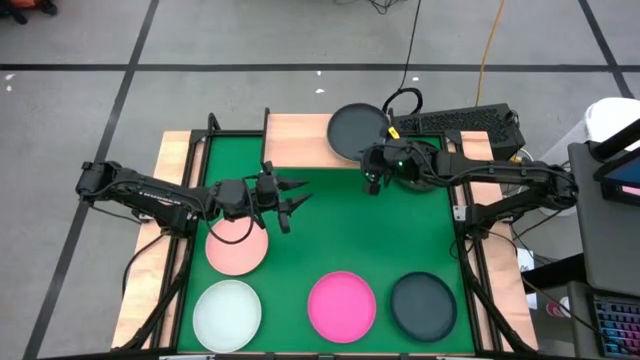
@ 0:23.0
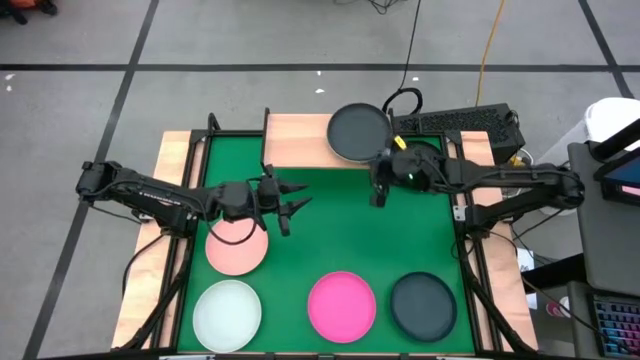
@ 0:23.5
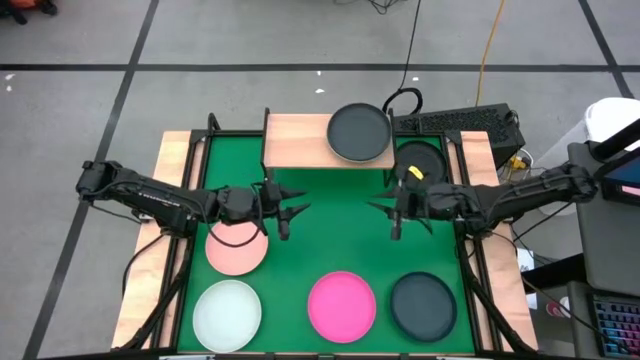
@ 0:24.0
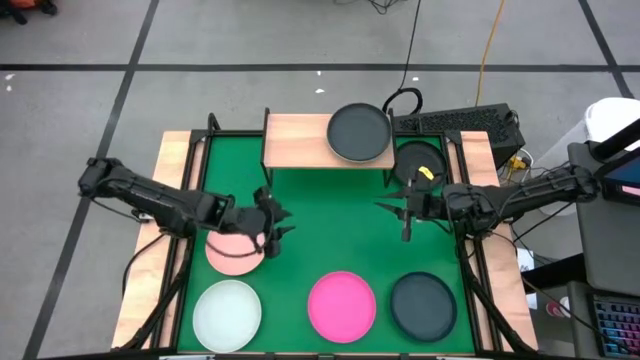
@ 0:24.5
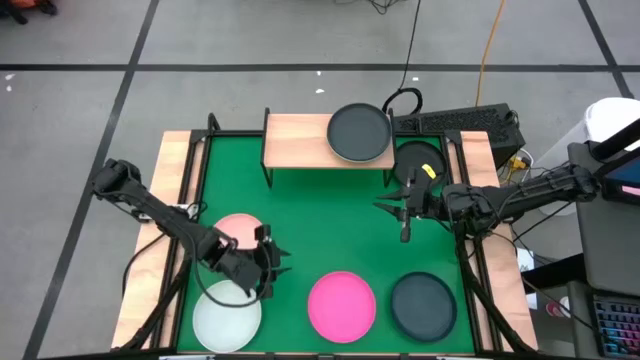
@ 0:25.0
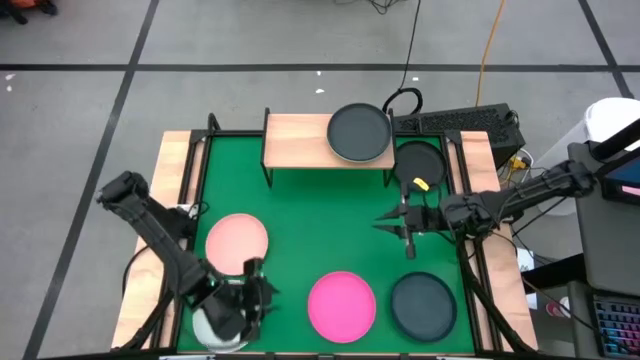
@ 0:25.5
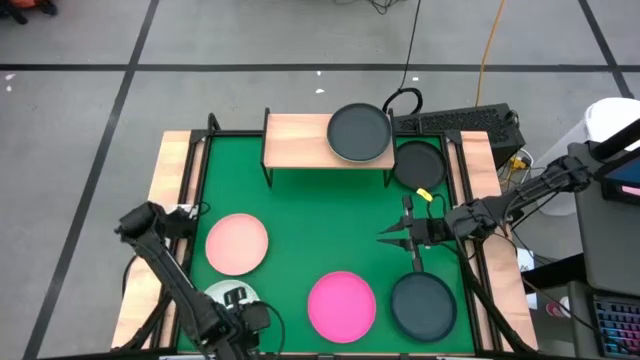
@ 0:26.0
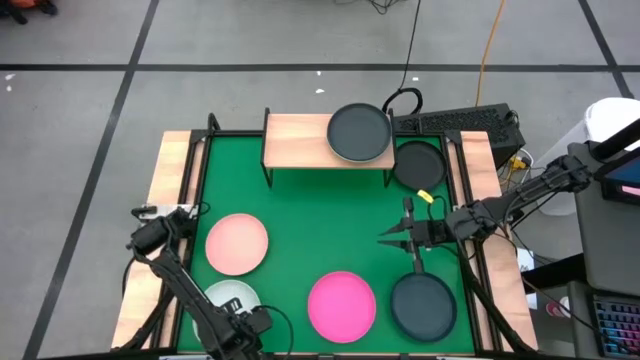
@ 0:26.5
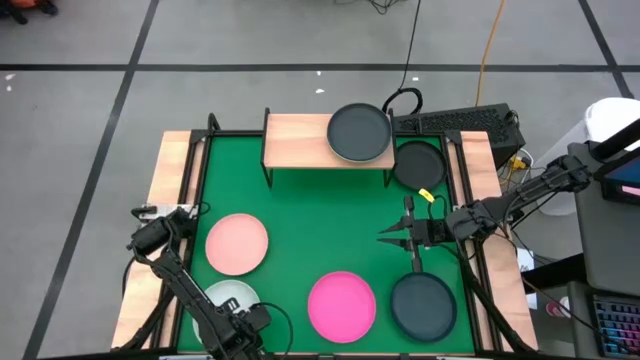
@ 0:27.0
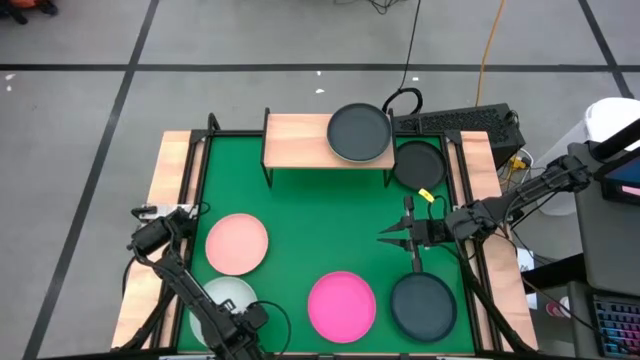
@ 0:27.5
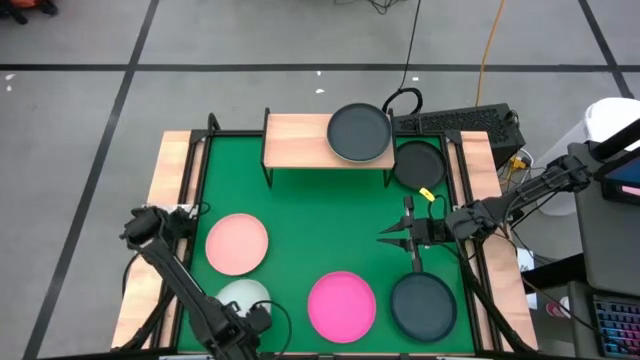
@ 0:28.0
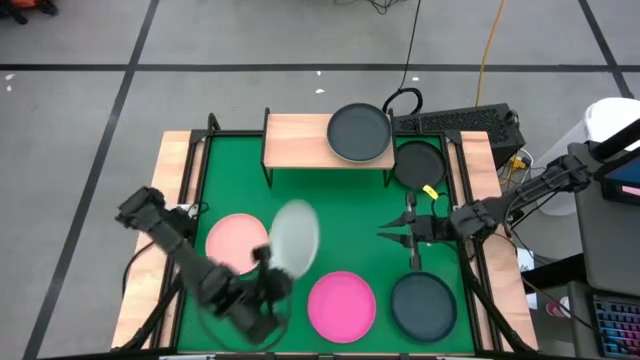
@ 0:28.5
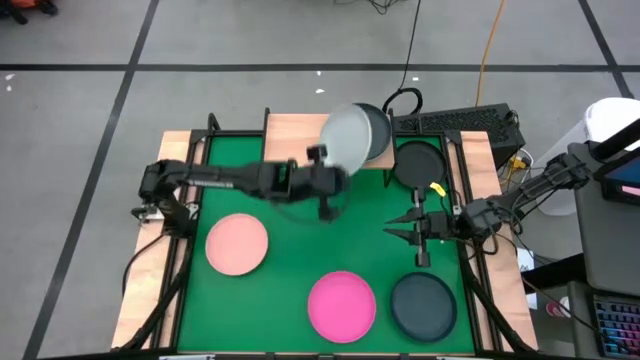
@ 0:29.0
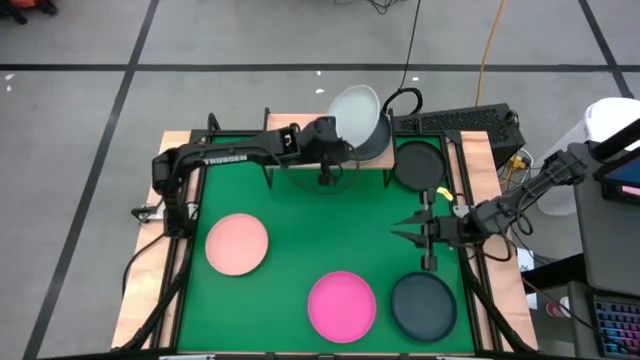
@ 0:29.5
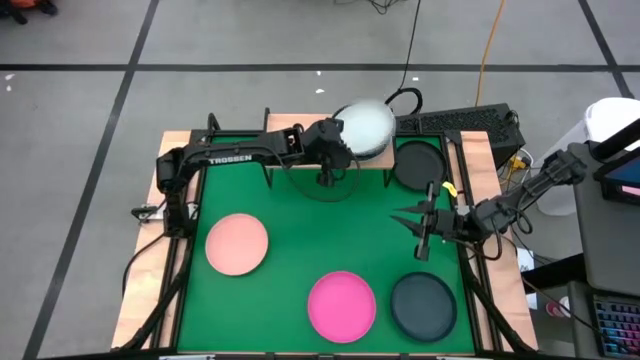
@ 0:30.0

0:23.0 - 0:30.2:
Task: Place and stack plates onto a shelf
Stack the gray plate on top of the black plate on the shelf

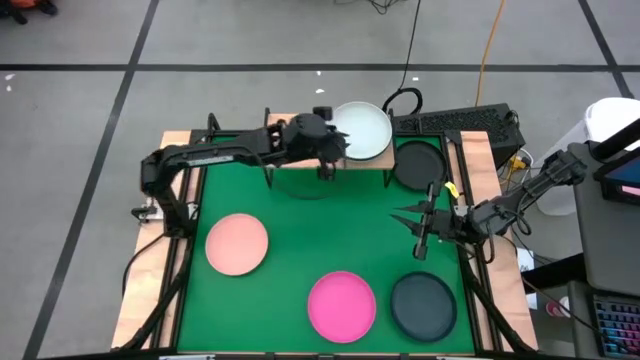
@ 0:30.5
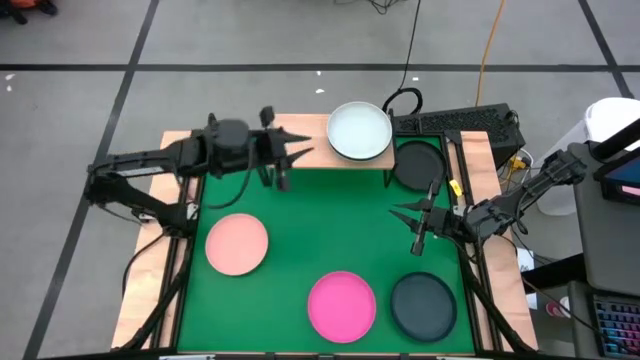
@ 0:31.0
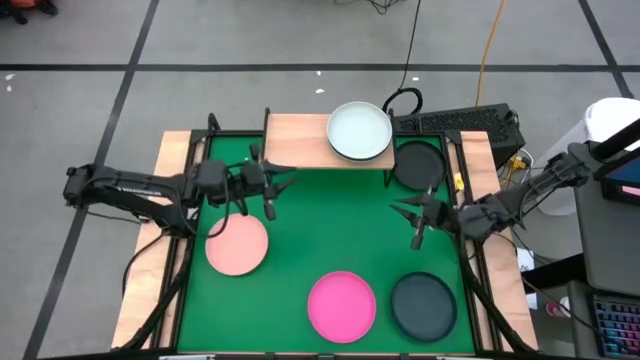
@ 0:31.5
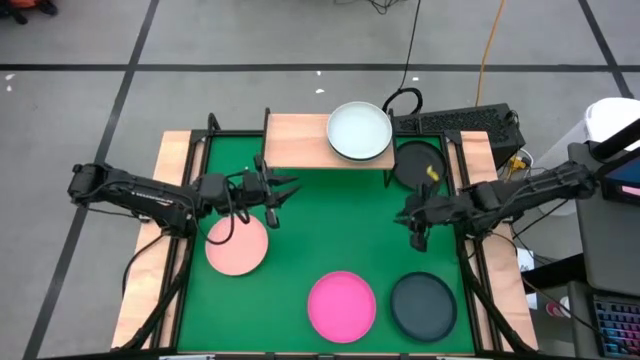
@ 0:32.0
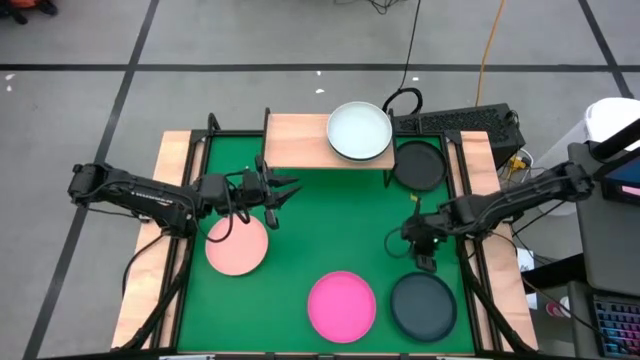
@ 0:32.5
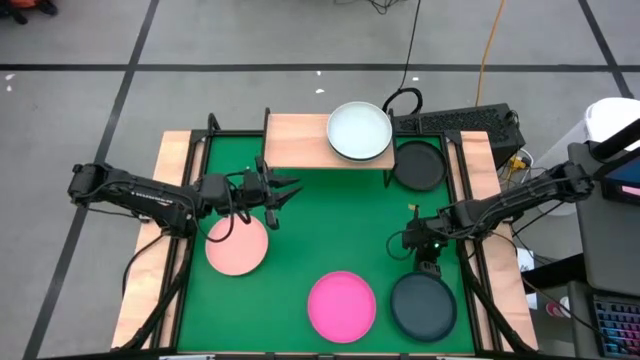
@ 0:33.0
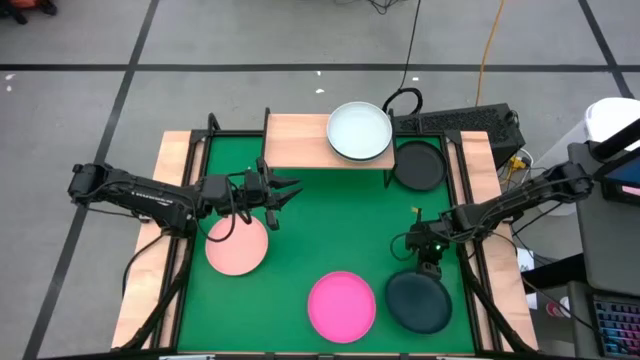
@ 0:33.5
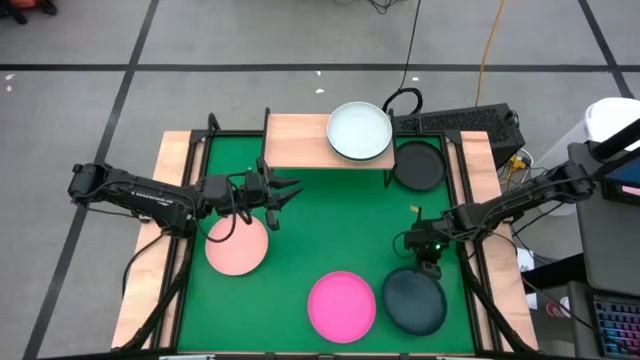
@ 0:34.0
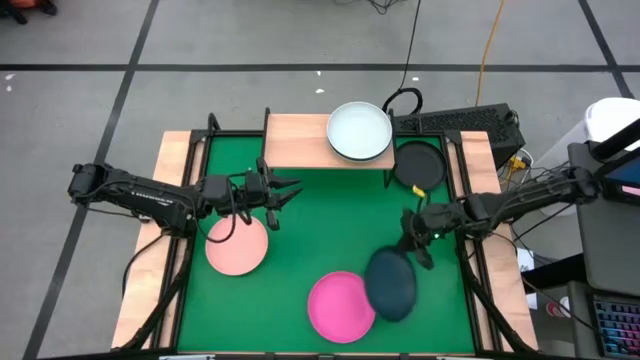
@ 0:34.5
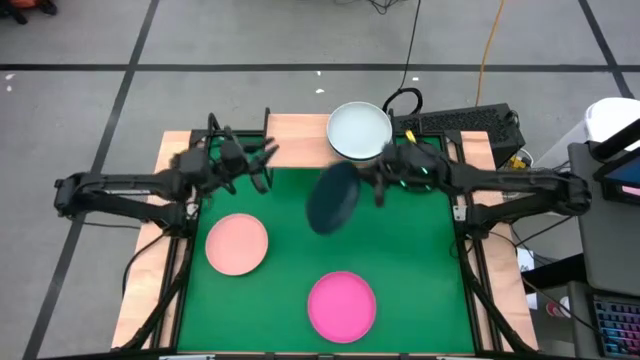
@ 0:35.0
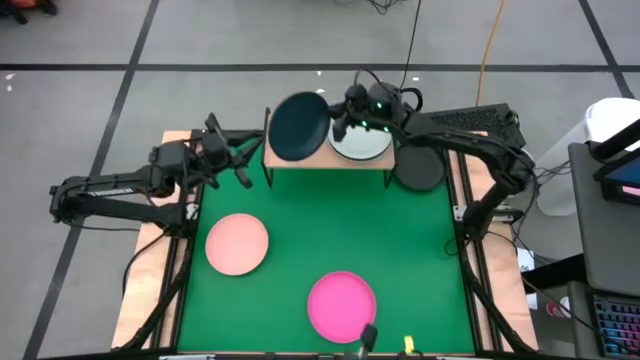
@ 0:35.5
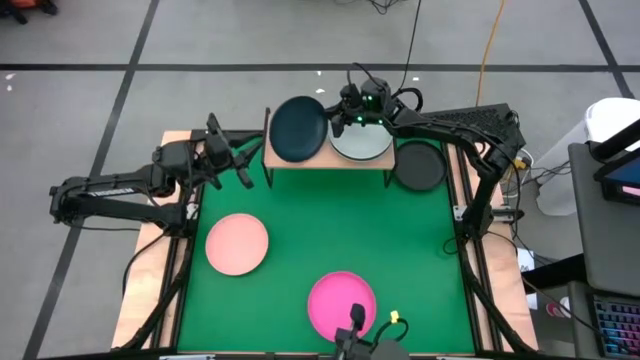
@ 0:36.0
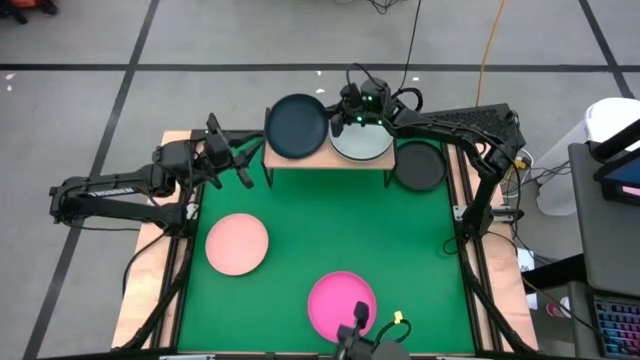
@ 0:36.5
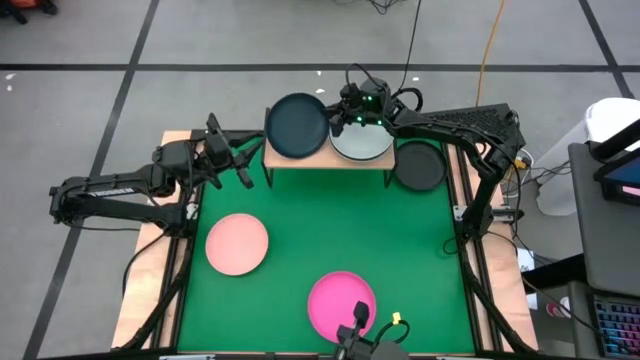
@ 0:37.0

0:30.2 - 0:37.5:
Put the dark blue plate on the shelf

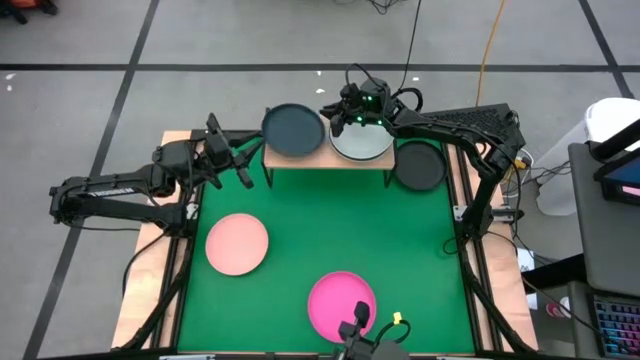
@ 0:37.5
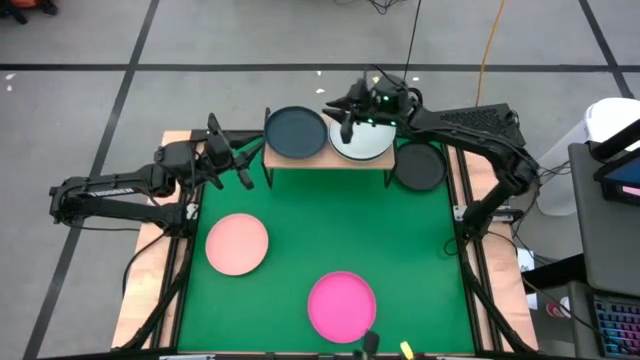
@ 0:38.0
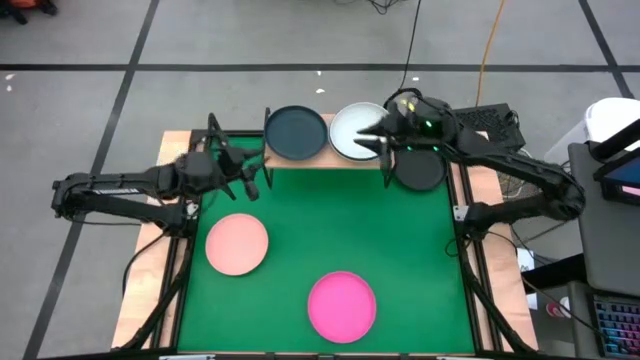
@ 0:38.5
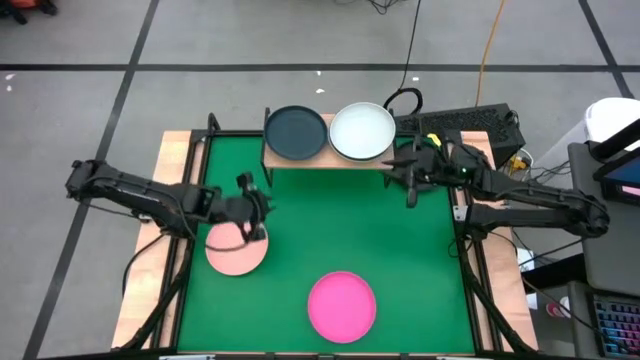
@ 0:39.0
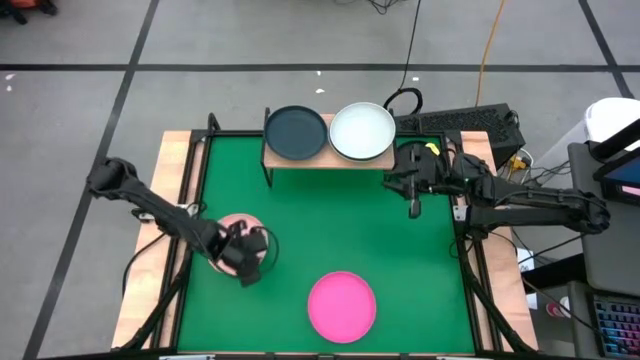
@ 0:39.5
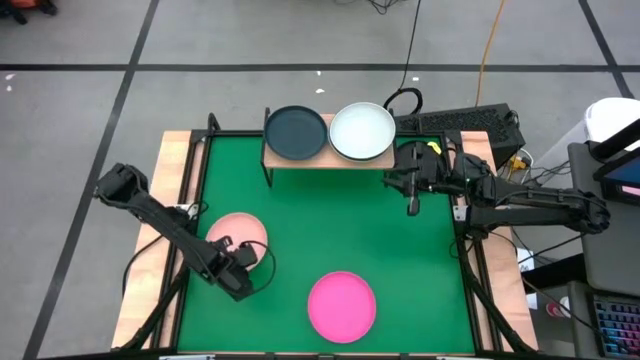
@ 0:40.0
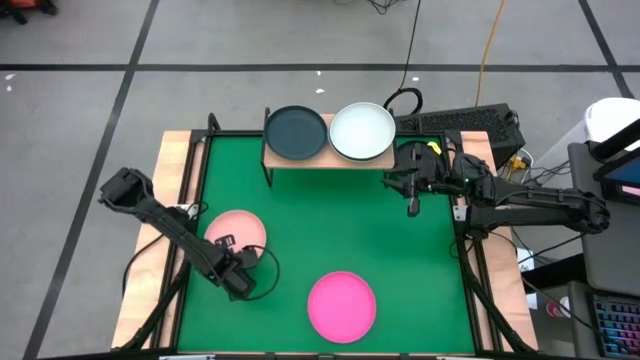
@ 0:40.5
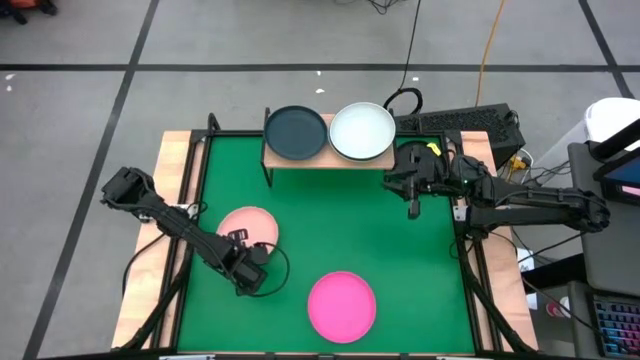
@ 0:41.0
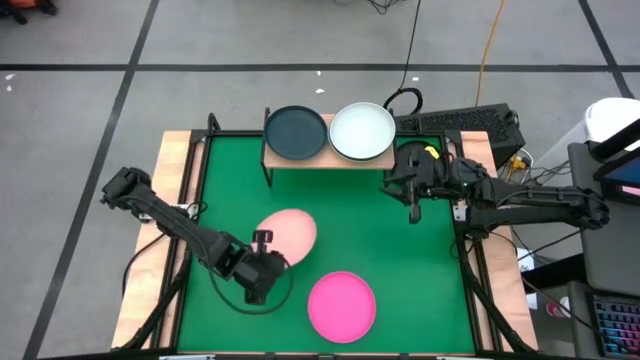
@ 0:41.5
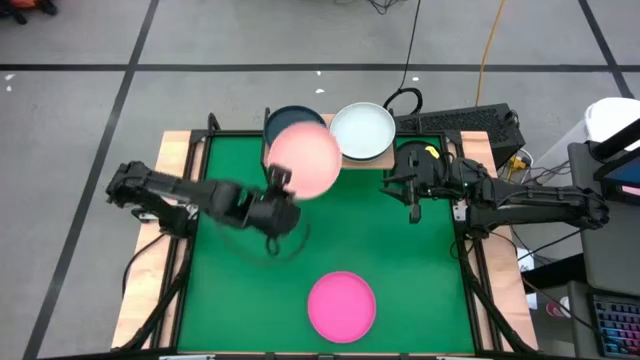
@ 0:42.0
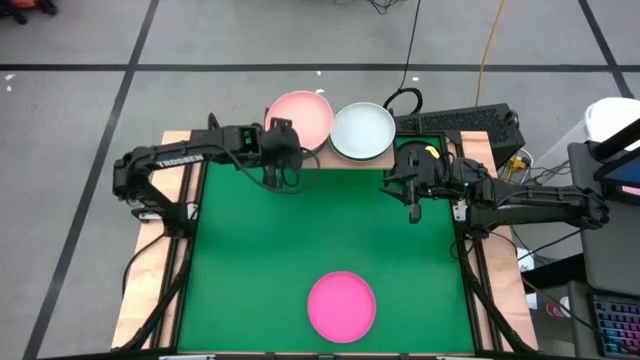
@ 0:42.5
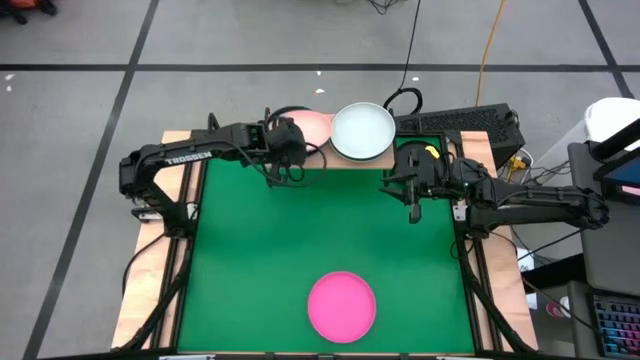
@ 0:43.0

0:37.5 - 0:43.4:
Stack the light brown plate on top of the dark blue plate on the shelf

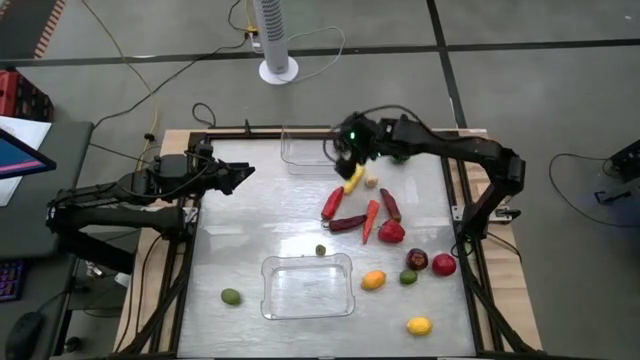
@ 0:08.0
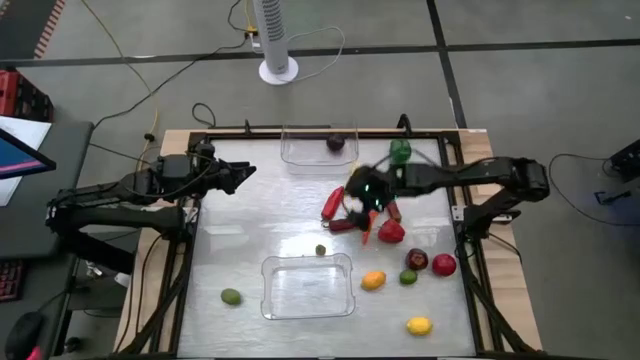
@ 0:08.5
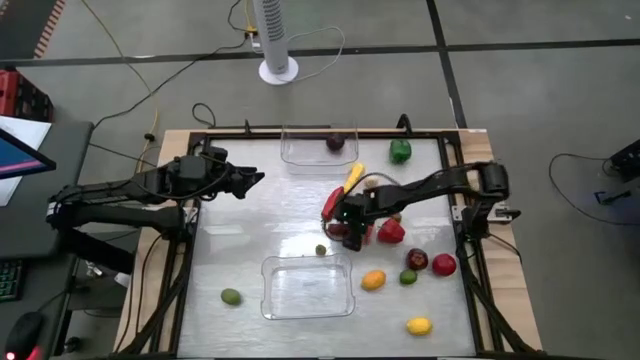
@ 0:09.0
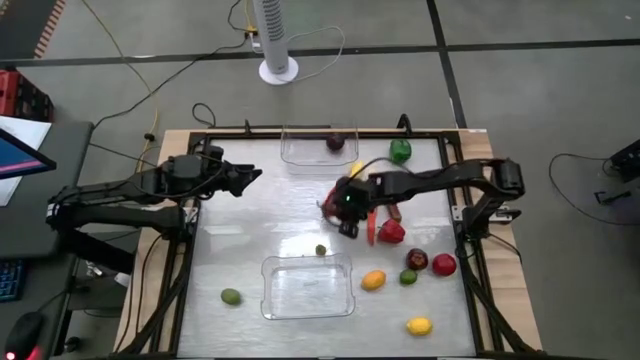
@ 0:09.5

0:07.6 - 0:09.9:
Task: Sort produce into baskets
Put the left dark red chili pepper into the top transparent bin
